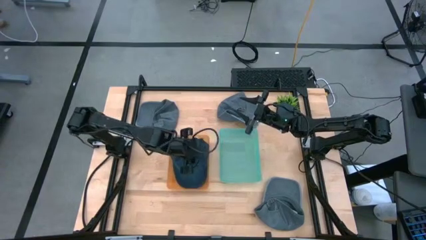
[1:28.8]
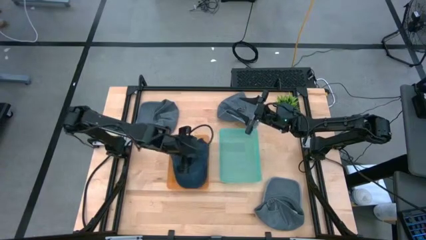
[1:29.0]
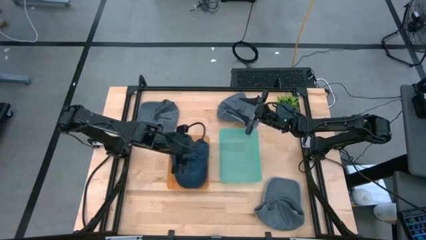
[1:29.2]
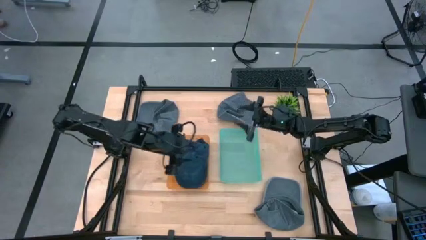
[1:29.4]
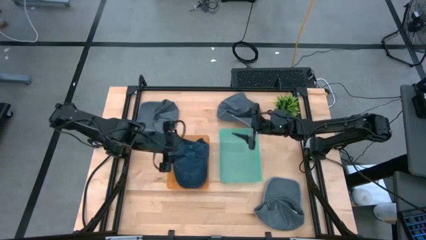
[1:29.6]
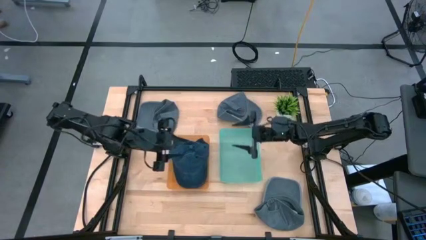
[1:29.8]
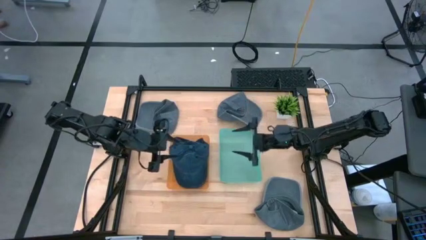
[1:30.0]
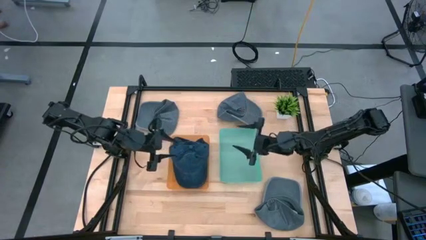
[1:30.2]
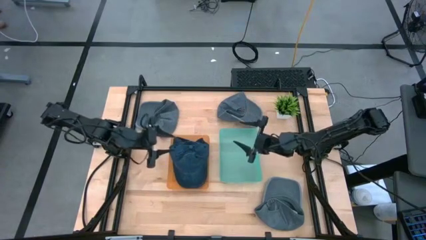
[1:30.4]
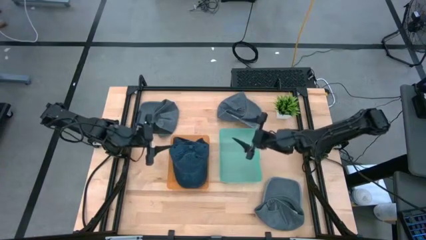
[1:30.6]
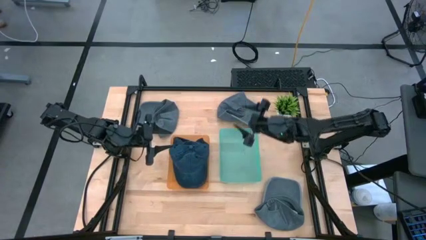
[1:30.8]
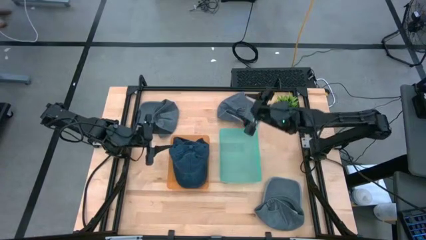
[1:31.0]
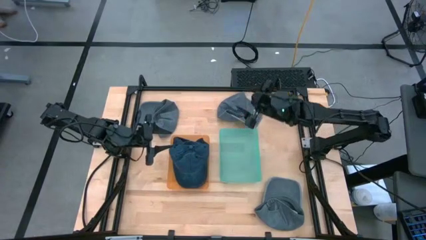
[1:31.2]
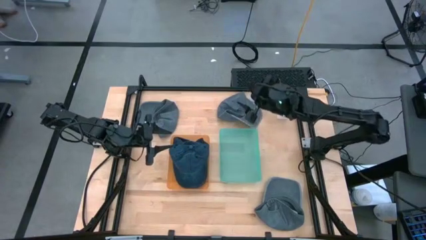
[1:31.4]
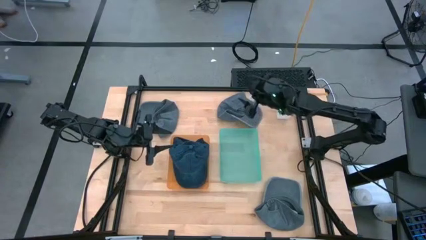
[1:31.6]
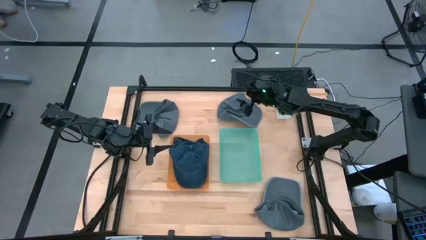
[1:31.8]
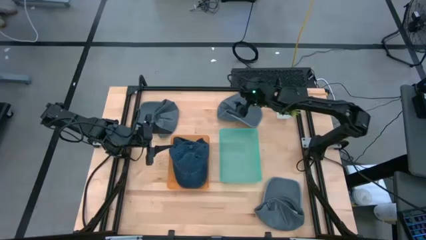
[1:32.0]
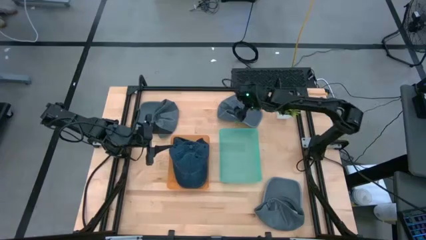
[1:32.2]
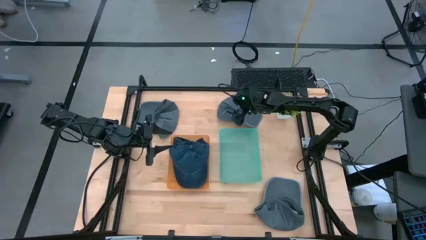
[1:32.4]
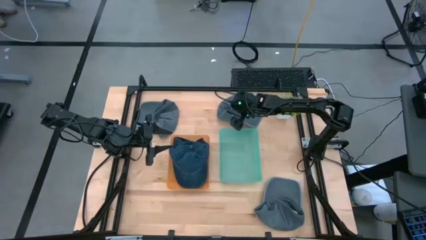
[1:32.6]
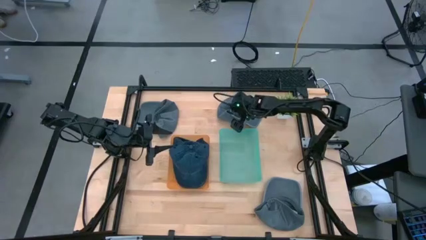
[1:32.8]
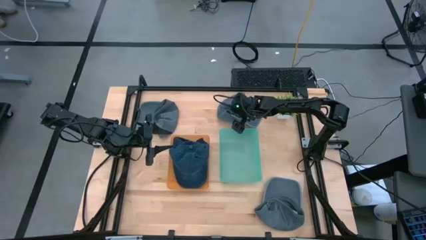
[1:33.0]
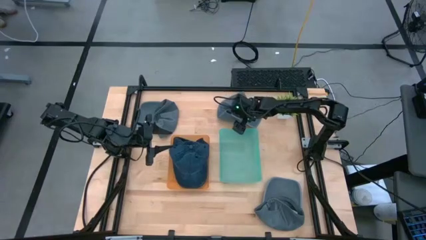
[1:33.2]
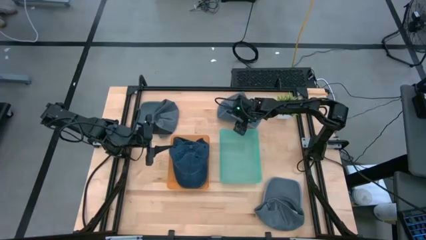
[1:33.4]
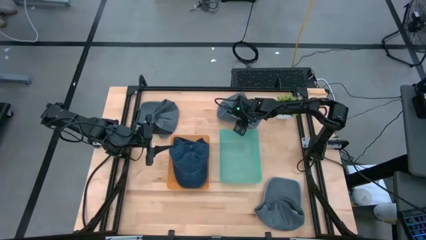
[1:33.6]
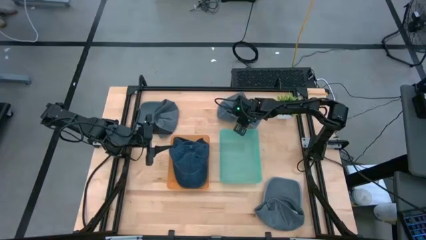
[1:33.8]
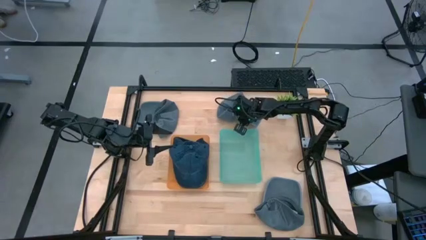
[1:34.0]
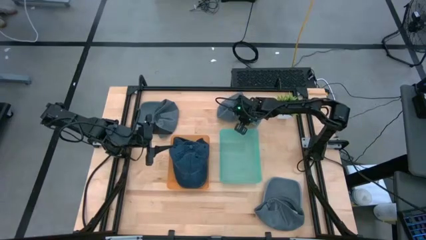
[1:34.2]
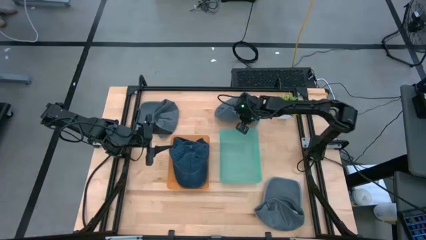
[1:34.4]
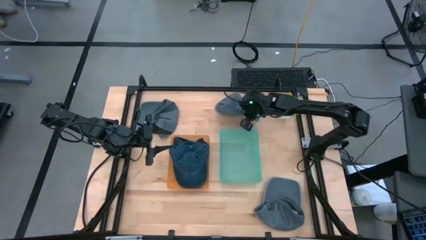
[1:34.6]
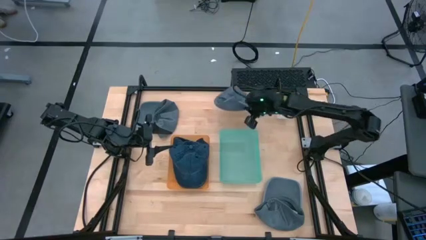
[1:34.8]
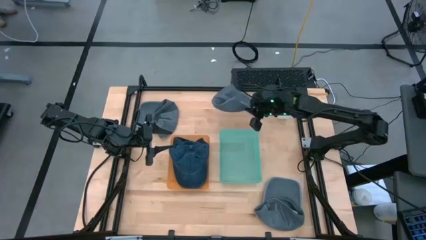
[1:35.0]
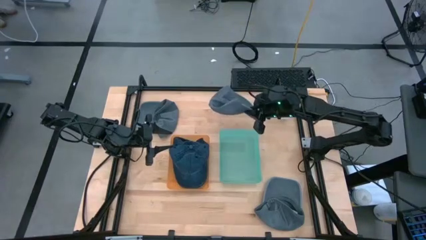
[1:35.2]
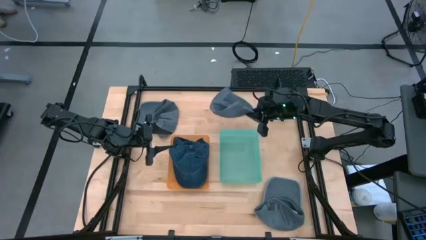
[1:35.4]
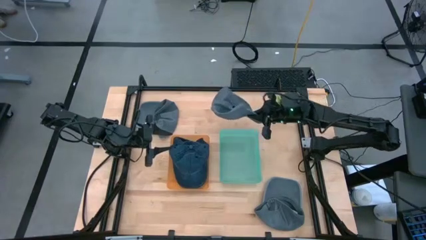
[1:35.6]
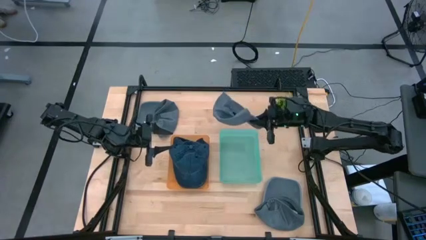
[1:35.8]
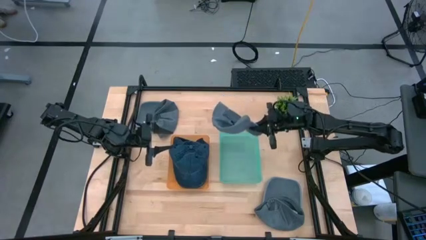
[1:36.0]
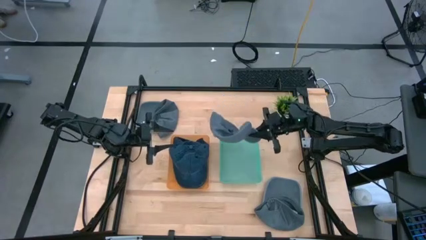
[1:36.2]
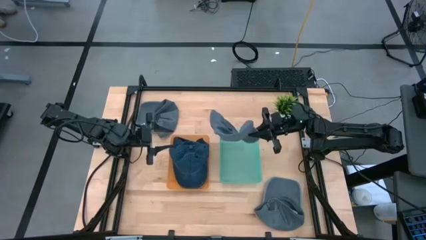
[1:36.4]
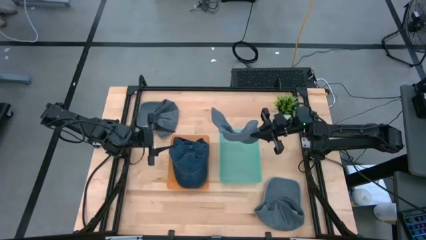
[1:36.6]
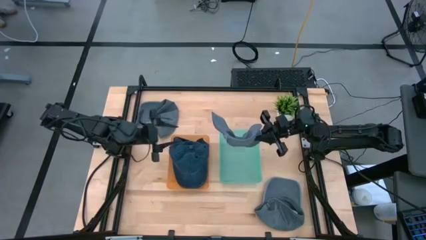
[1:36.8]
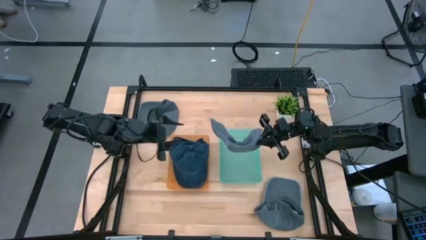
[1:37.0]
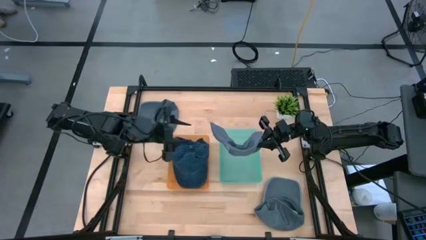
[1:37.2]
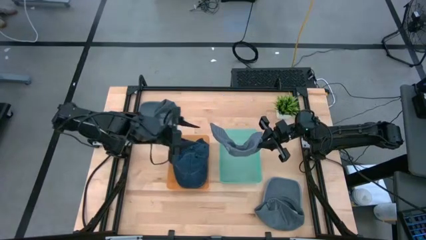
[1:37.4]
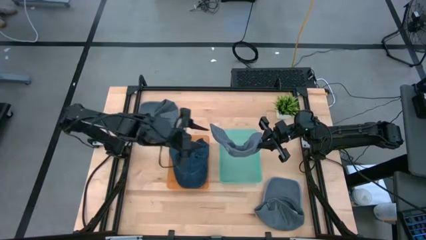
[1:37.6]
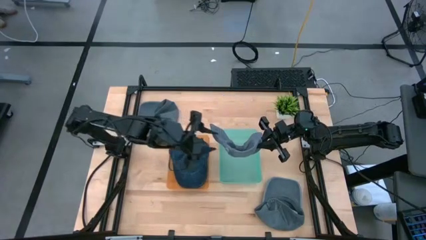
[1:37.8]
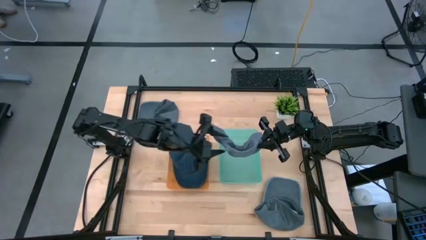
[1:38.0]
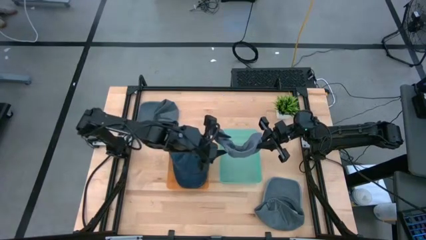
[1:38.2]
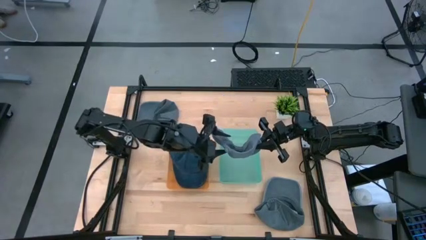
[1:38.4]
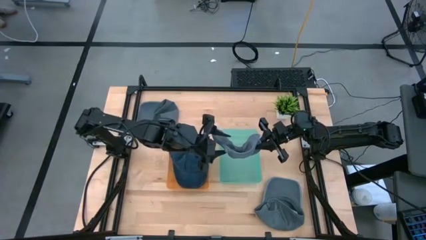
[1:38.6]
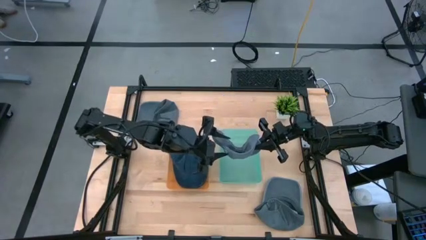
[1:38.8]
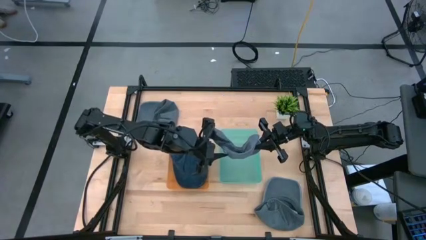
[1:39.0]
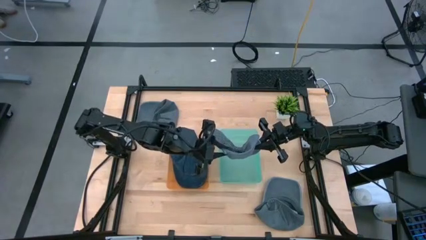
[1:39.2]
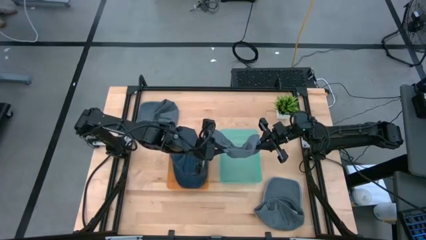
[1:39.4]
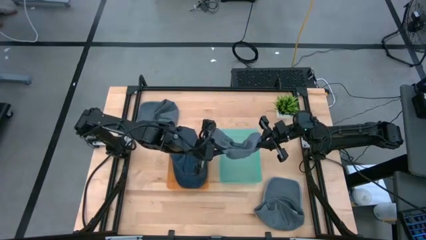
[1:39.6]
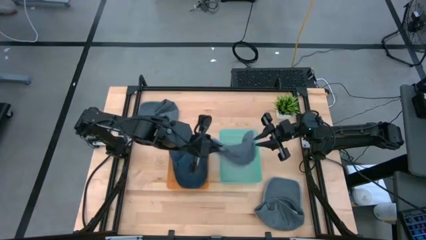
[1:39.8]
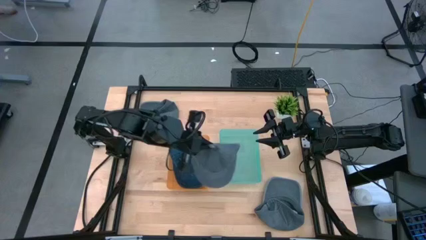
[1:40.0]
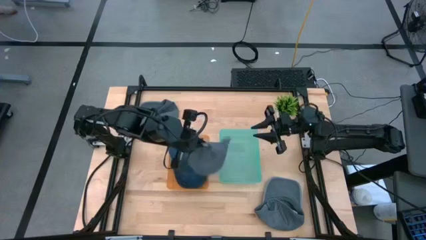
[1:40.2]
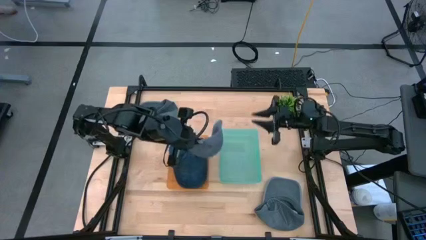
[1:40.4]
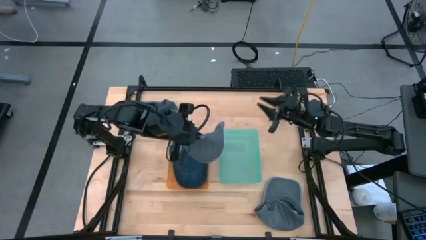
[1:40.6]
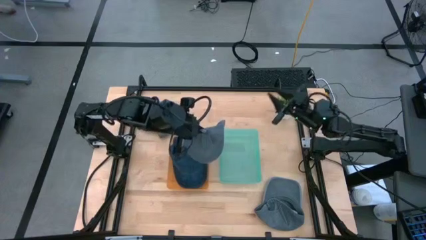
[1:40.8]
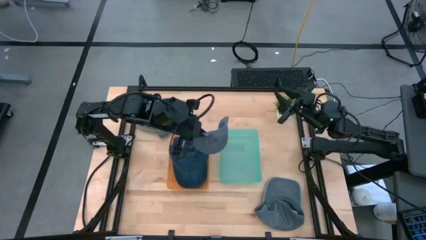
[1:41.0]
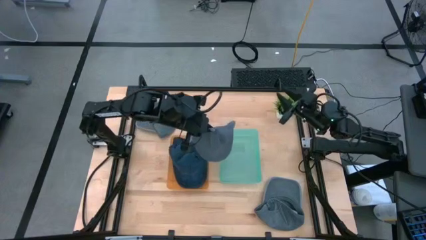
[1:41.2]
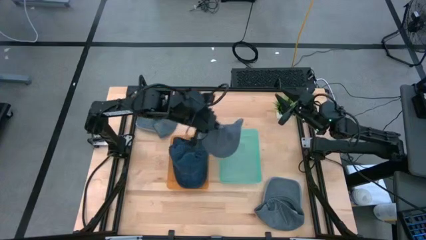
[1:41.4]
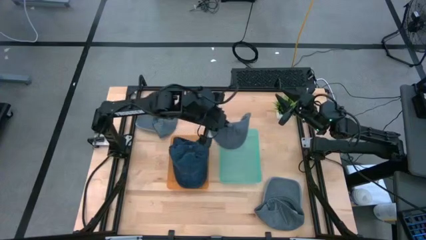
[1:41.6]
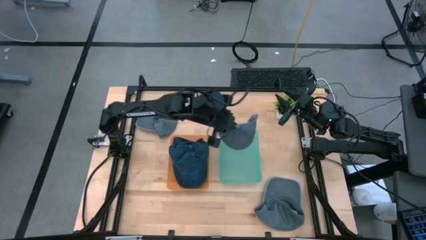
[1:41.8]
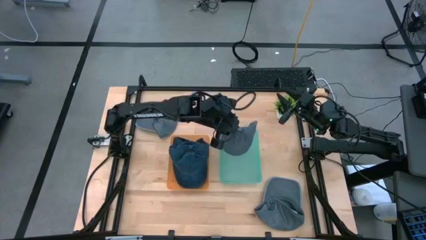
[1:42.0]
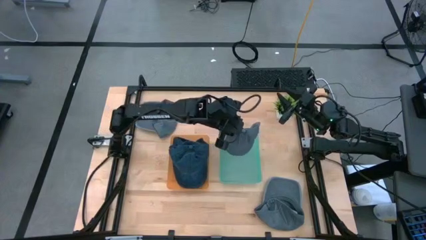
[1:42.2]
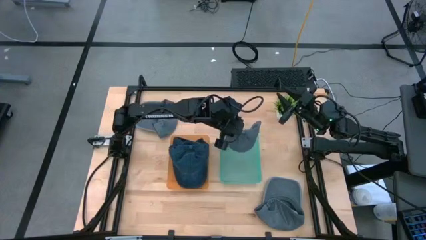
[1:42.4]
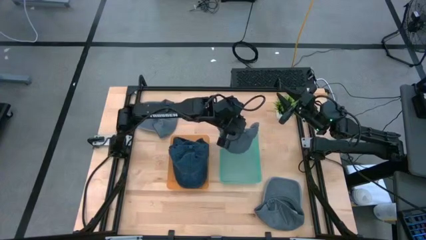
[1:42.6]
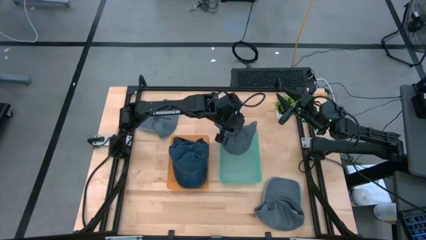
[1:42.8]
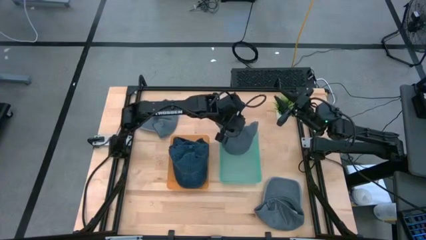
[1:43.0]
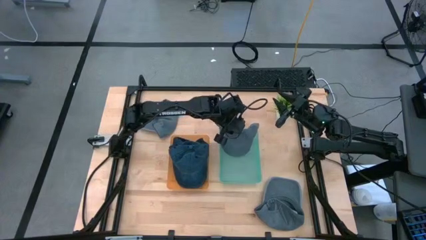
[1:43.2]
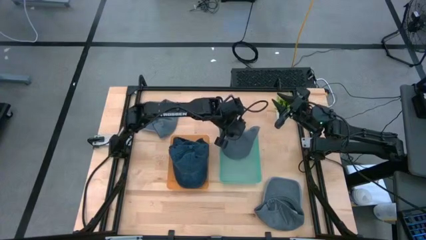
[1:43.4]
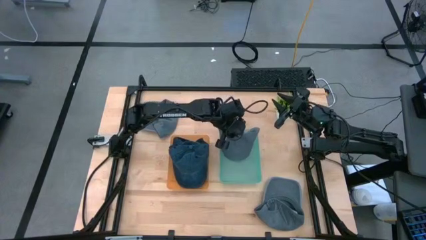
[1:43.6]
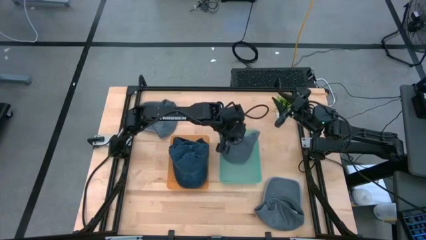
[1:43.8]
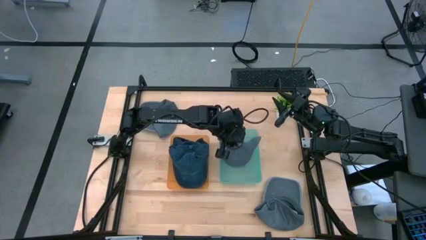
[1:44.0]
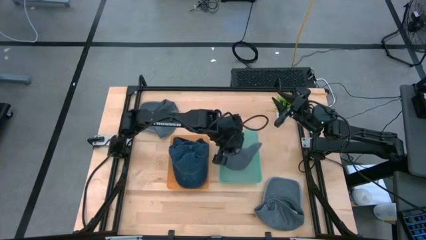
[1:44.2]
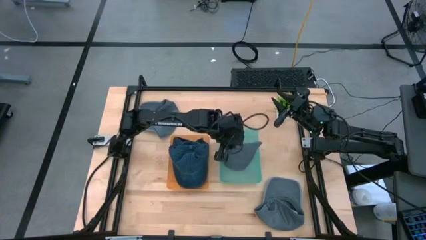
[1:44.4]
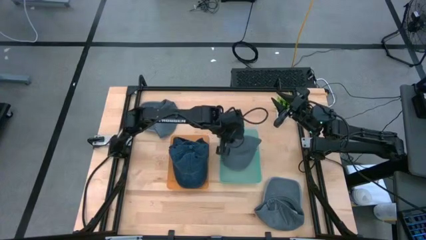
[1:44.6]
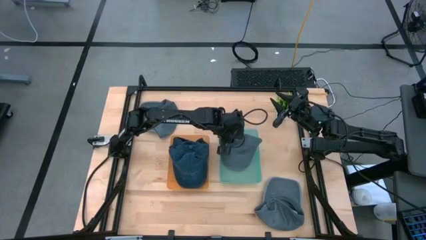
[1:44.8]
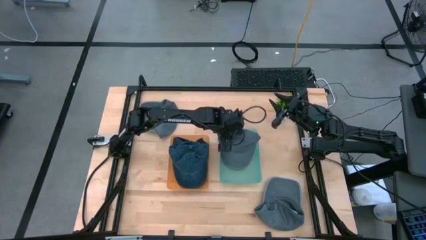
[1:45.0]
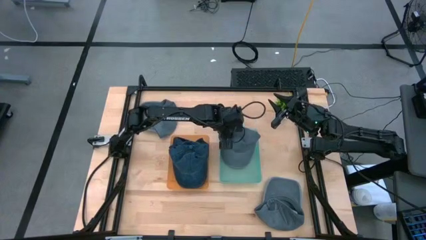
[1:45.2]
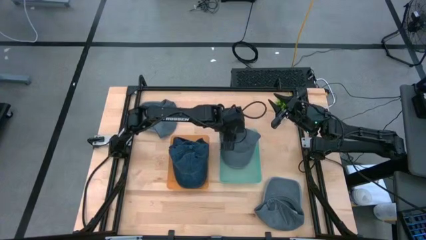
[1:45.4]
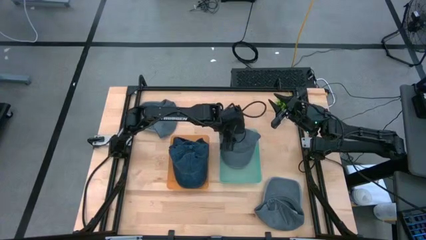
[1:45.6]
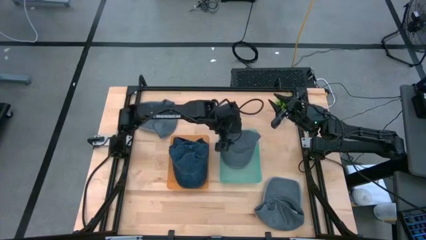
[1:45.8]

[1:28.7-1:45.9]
Task: Pick & Place hat
Put the top right gray cap into the green bin

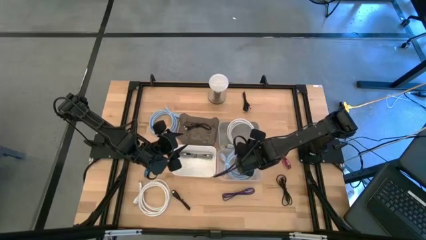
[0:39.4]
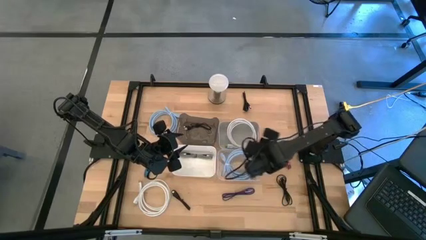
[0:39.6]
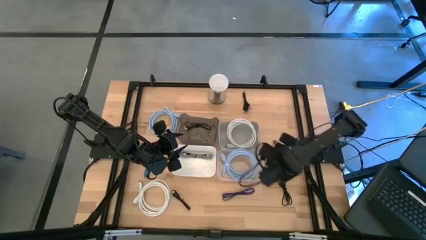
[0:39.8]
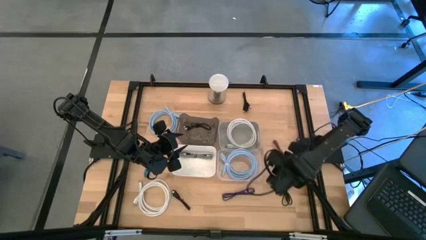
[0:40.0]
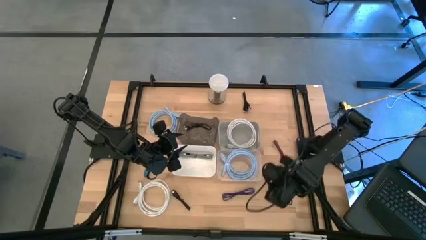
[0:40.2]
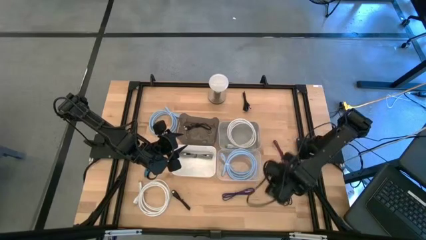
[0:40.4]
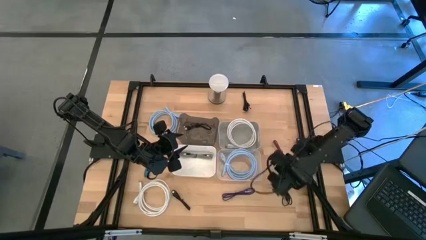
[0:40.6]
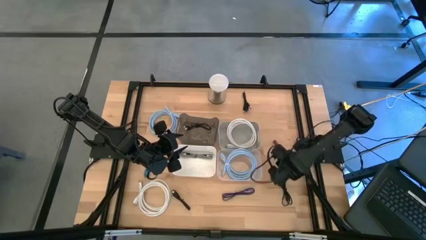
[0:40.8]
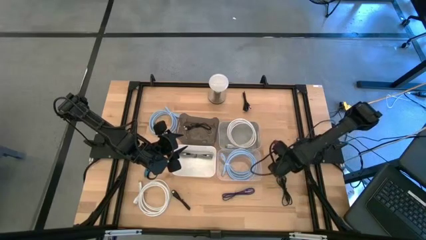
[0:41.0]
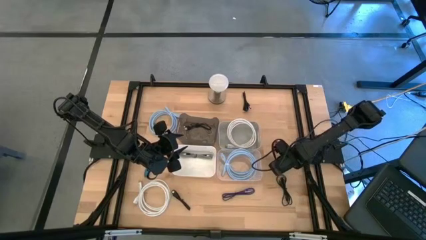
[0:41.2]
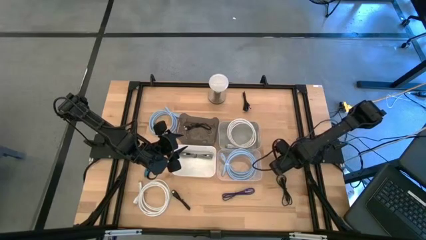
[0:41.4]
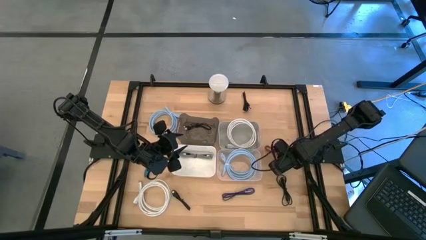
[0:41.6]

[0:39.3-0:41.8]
Task: Pick & Place USB Port
Put the red patterned charger cable into the white bin
